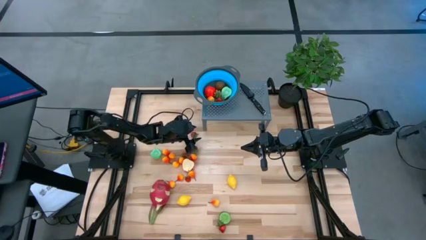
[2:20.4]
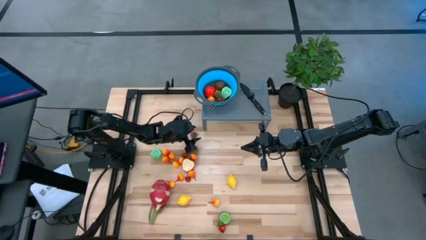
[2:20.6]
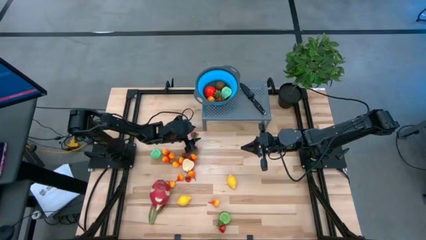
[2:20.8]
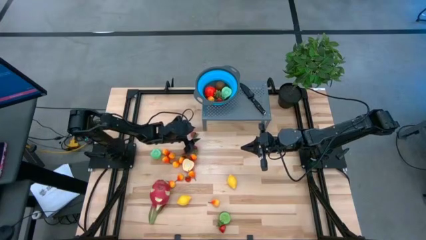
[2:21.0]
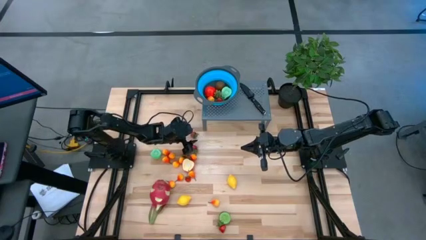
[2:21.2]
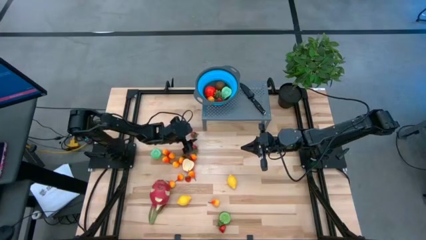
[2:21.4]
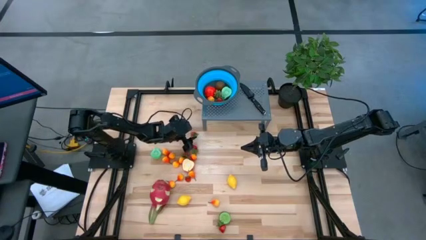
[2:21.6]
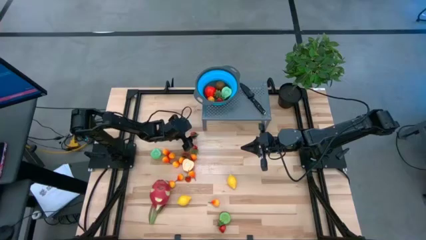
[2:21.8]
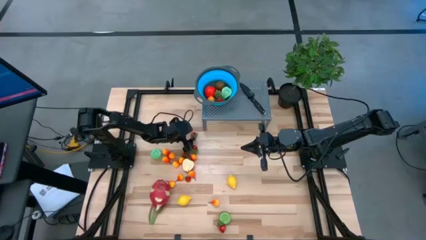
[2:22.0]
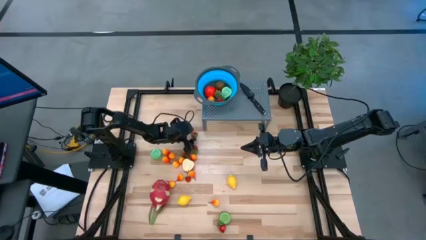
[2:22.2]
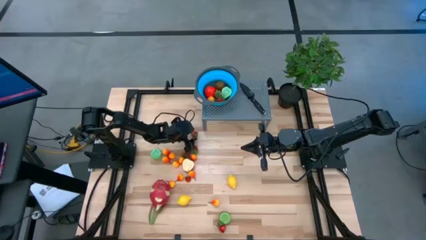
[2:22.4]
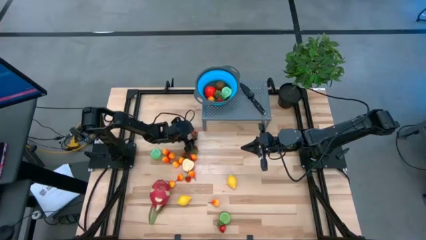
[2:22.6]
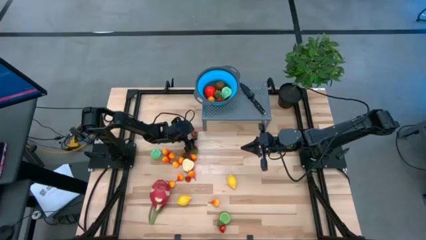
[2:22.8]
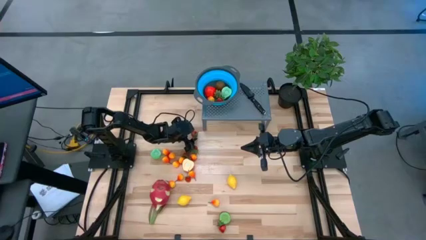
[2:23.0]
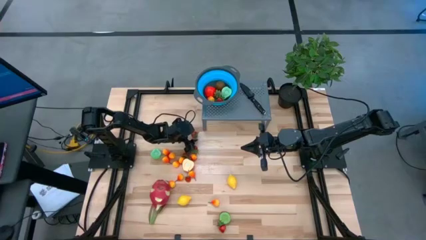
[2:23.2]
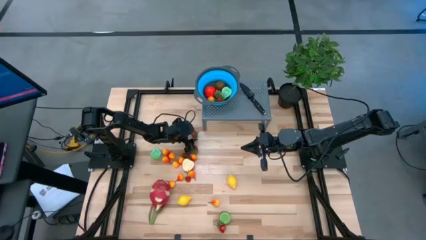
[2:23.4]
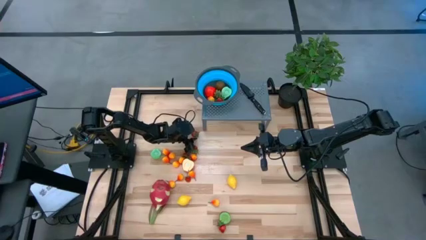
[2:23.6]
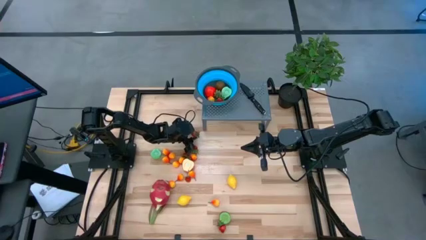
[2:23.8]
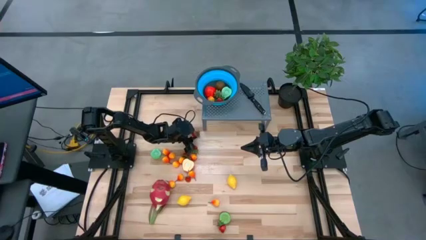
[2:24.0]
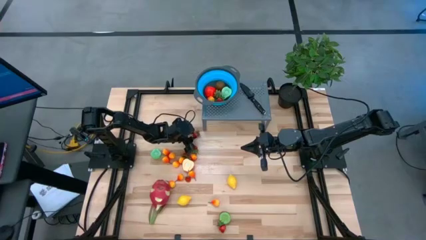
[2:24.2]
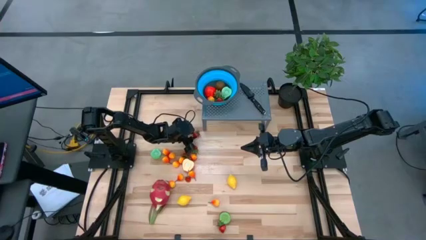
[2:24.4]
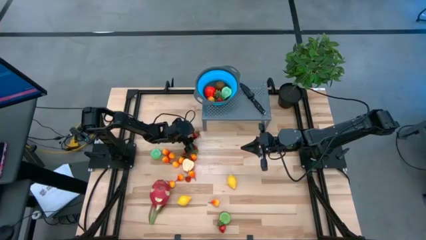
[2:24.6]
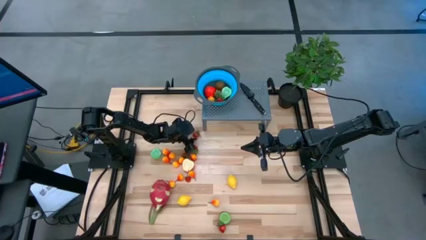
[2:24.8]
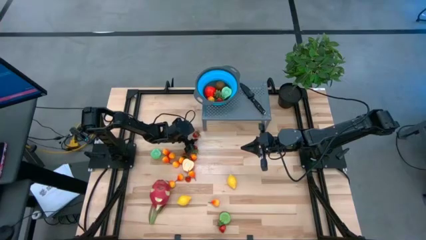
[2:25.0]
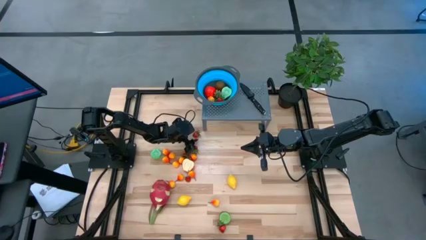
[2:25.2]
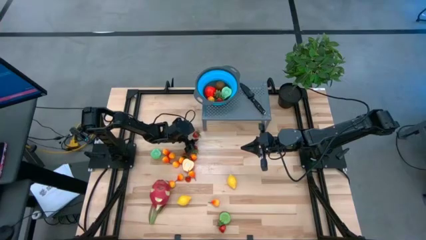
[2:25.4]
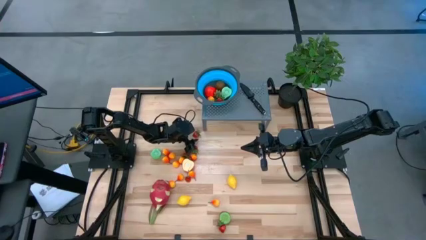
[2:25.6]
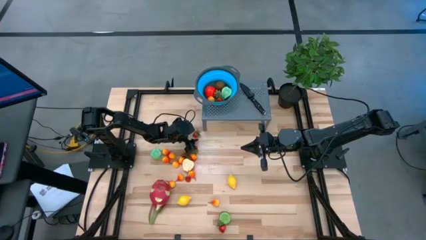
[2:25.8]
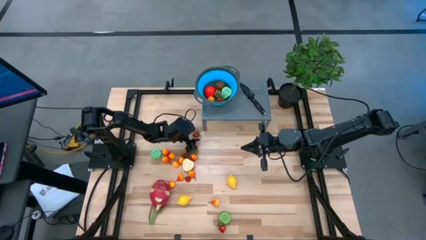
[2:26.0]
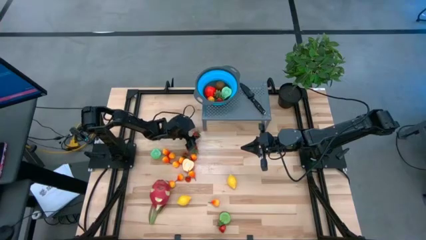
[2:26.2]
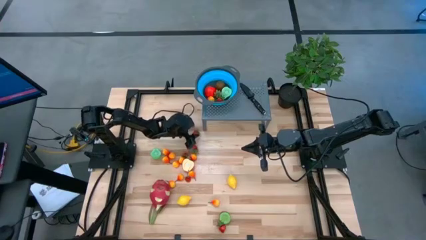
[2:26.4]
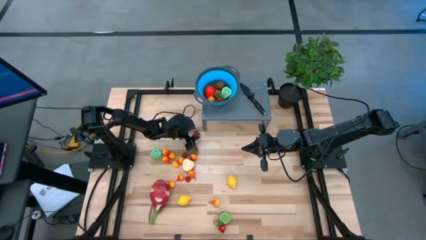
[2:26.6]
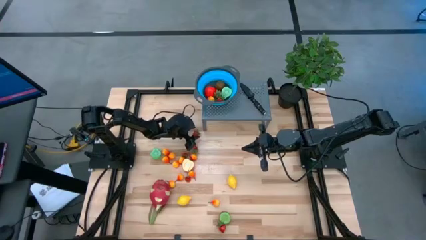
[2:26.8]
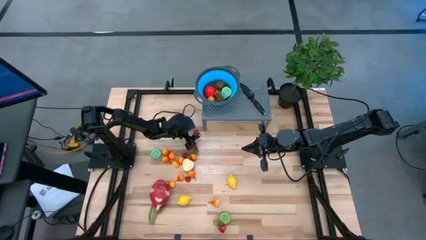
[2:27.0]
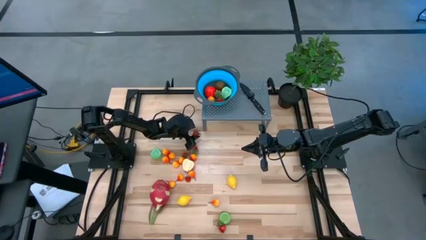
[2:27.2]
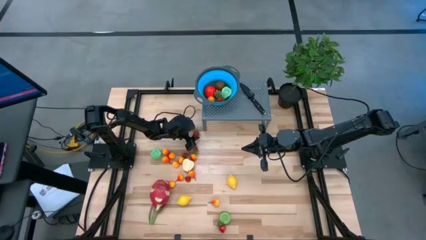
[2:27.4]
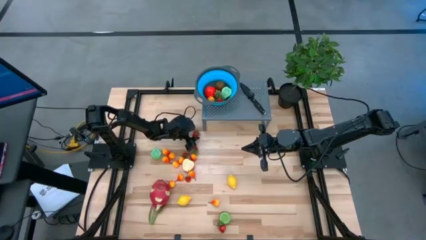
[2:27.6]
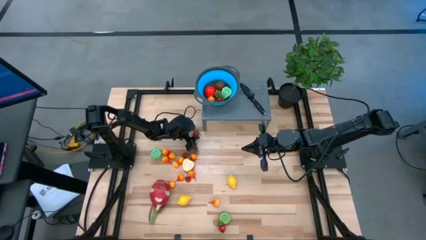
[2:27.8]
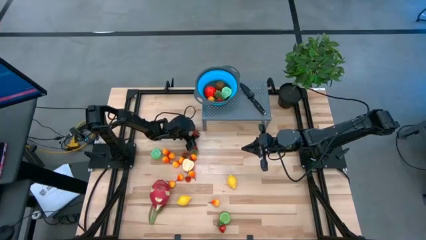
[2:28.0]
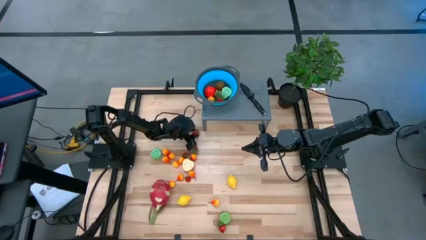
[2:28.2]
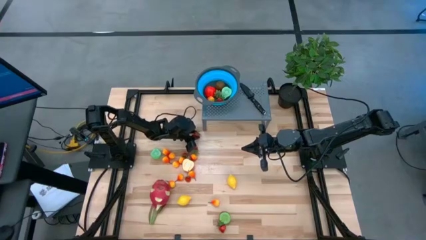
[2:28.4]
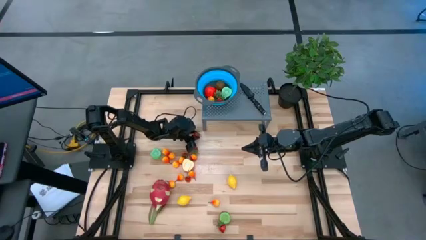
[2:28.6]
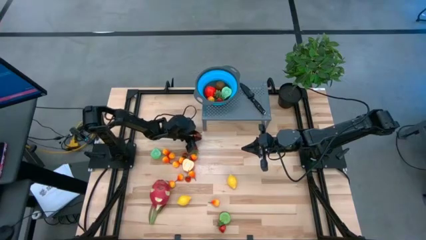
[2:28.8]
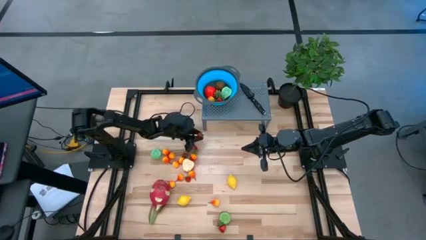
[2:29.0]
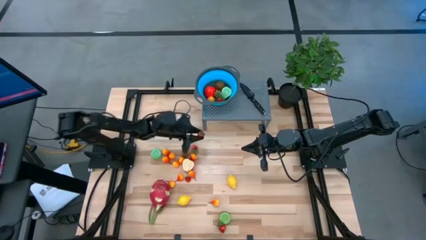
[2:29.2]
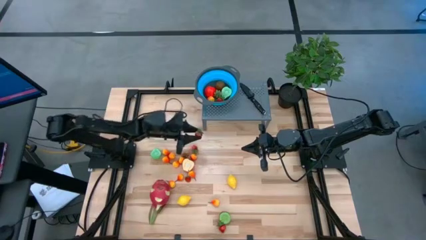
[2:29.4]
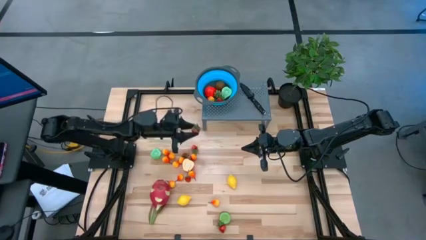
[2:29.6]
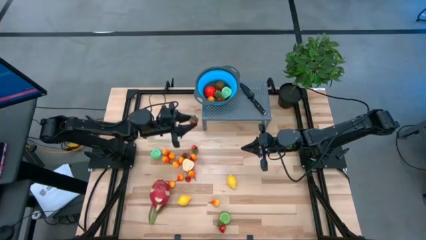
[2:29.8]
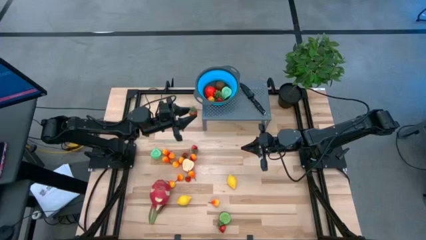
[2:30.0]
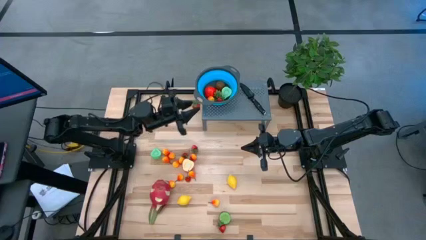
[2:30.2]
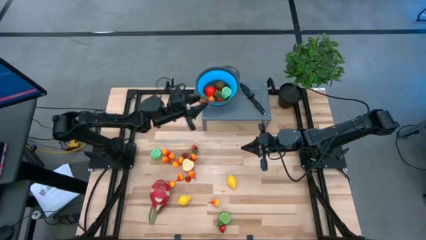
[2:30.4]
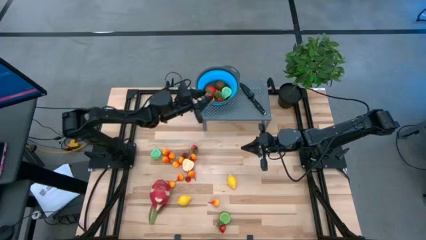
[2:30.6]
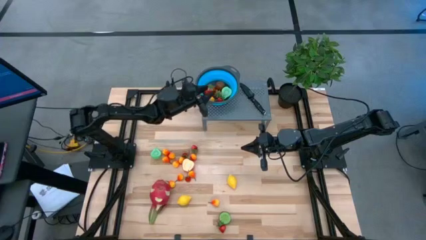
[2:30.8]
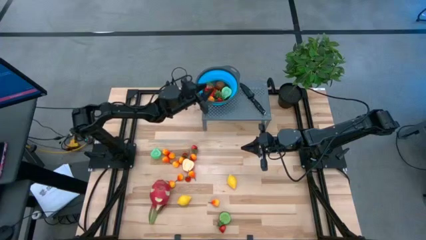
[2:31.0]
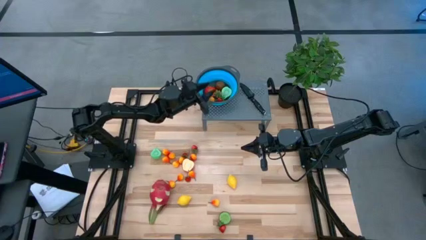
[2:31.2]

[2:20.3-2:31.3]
Task: Pick & Place Fruit
Put the strawberry into the strainer bowl

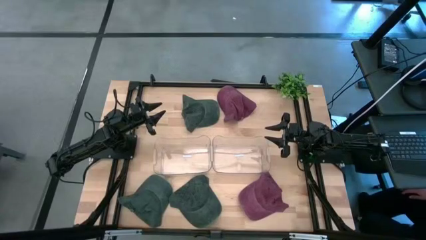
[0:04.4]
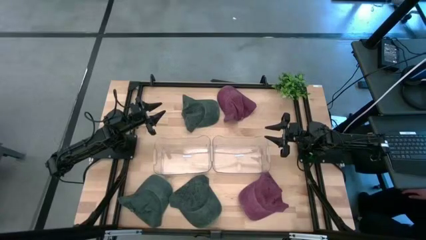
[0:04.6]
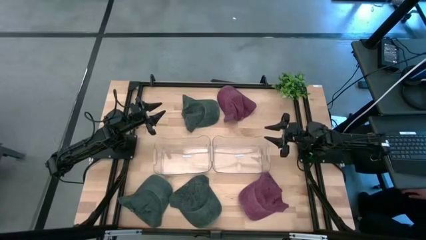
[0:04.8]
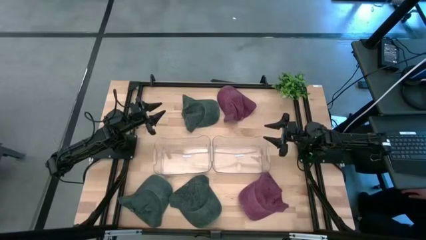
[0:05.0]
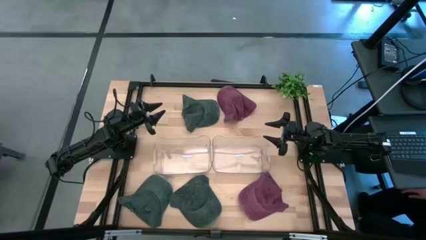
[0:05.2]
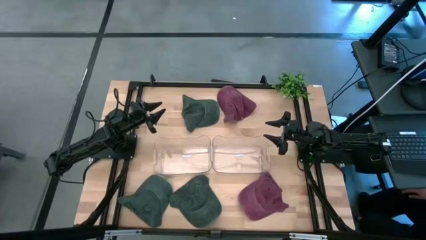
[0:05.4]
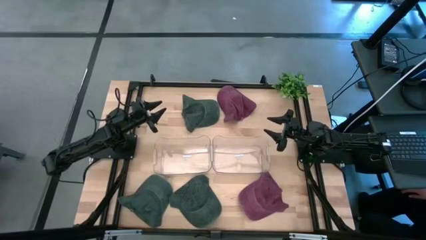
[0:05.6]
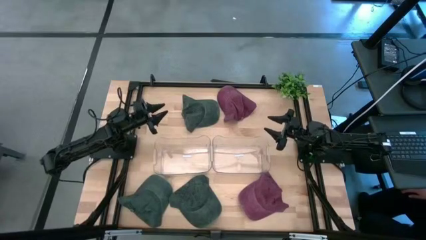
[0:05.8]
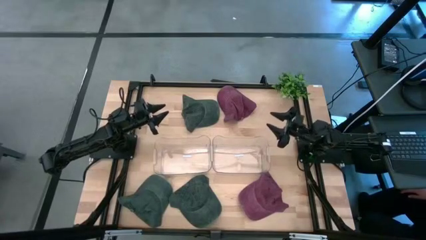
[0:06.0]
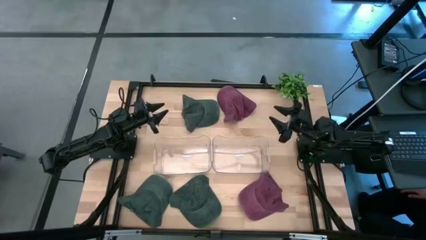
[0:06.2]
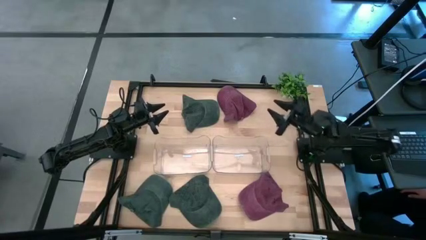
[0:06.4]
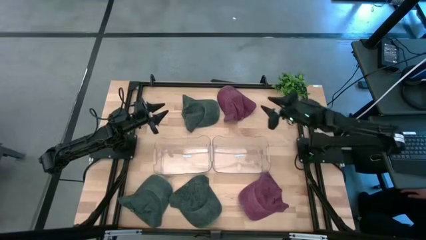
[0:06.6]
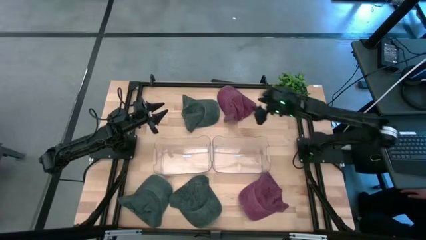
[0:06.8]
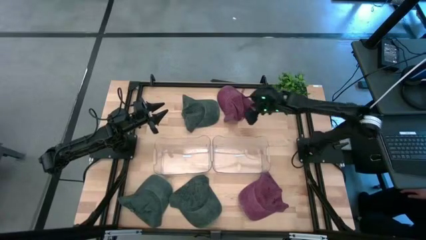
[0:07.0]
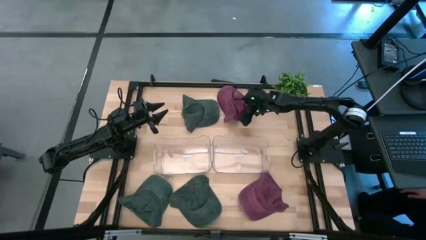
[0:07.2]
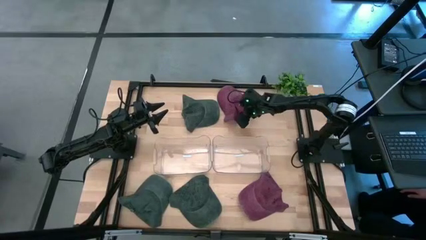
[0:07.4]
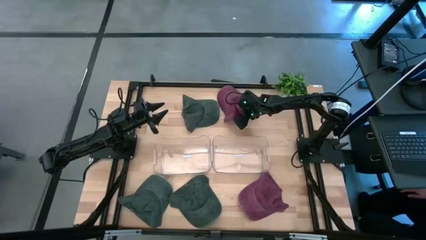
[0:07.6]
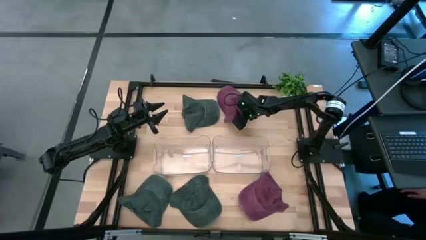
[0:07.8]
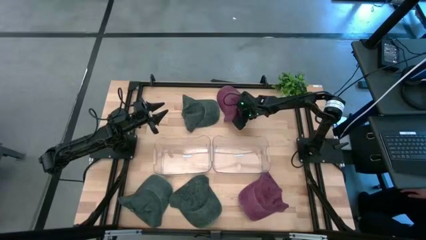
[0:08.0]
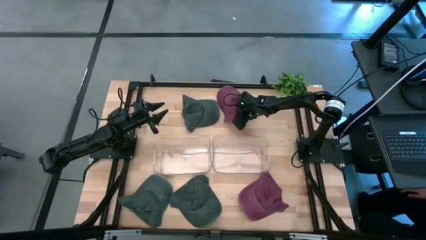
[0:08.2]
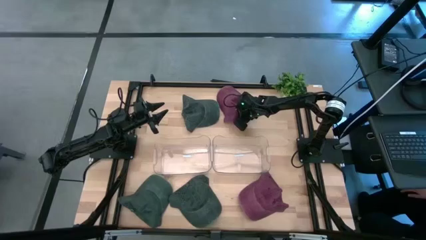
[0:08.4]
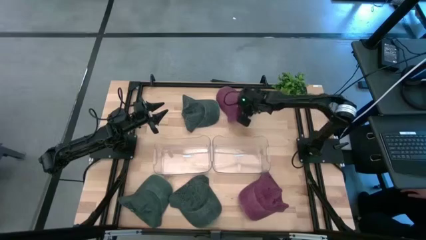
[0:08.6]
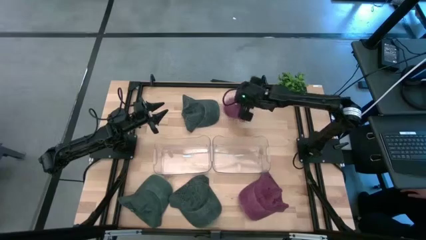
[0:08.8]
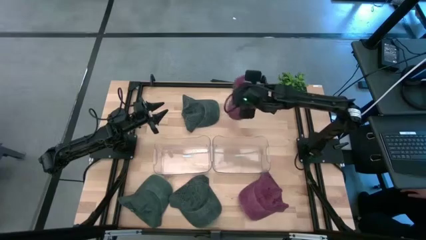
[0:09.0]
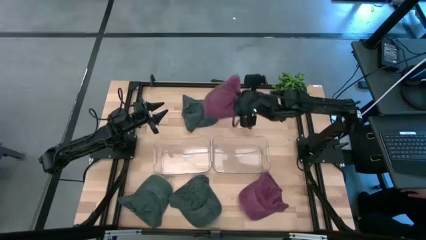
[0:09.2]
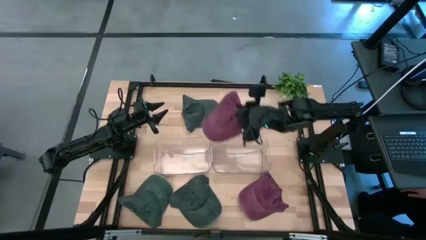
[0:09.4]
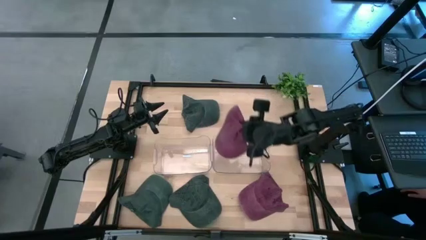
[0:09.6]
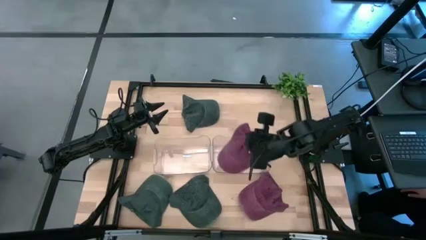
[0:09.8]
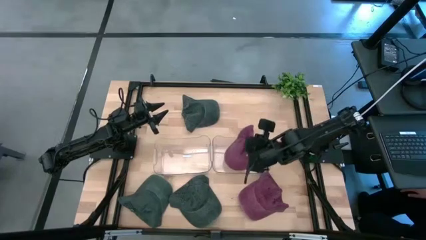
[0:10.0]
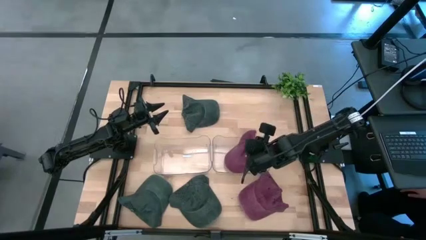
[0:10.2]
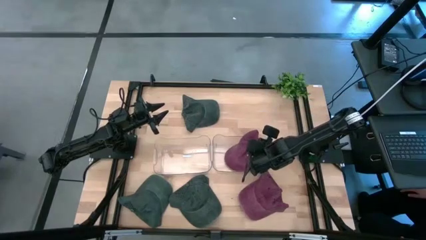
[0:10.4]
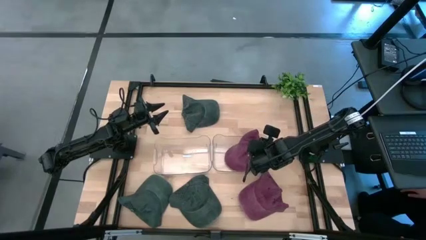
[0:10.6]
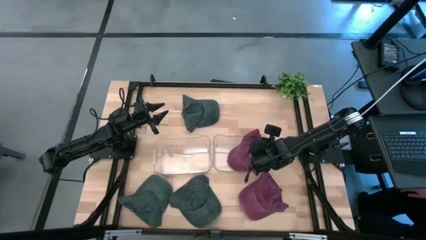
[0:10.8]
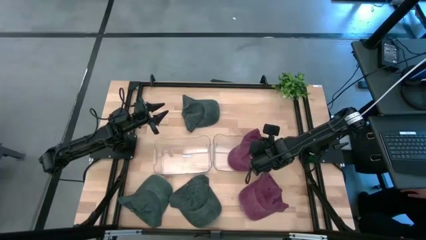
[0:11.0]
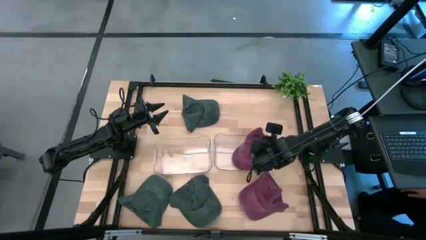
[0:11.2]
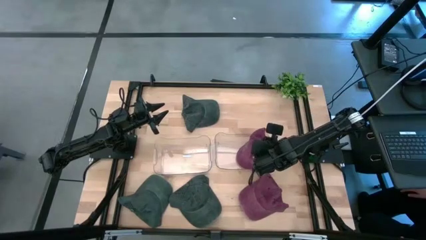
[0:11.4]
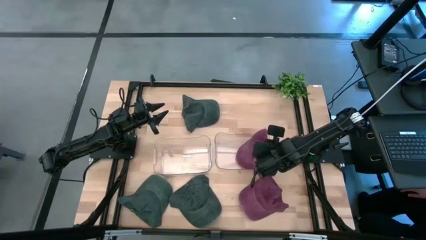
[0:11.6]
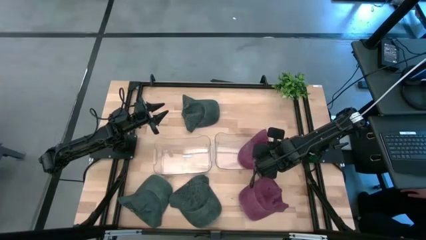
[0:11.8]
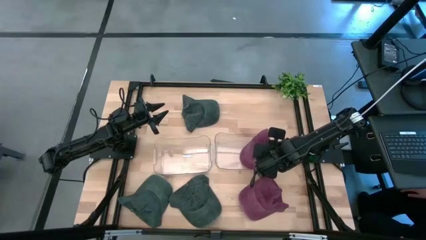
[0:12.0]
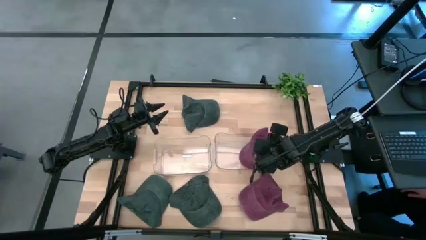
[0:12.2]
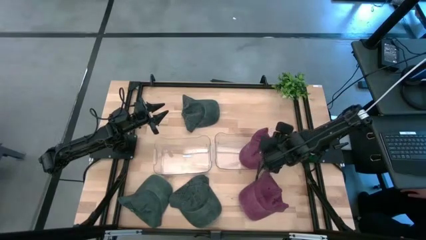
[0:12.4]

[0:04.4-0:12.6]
Task: Pick & Place hat
Put the top red cap into the right transparent bin
